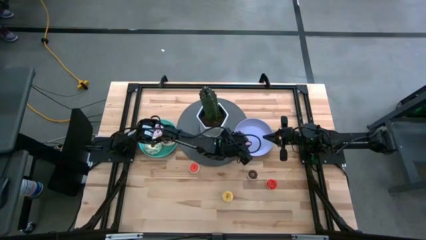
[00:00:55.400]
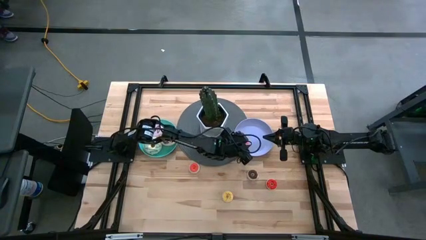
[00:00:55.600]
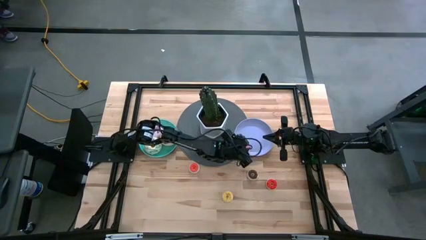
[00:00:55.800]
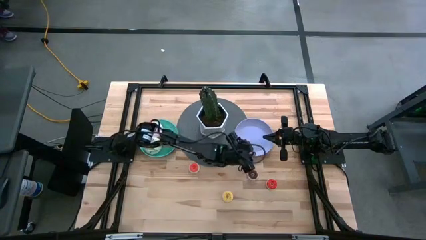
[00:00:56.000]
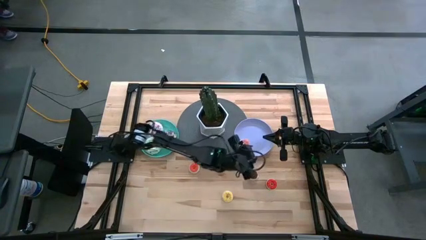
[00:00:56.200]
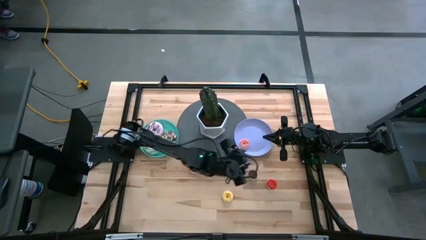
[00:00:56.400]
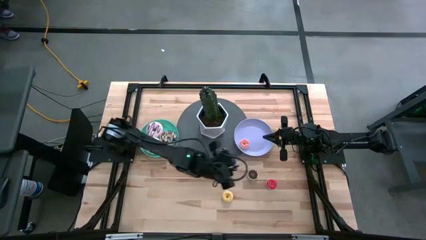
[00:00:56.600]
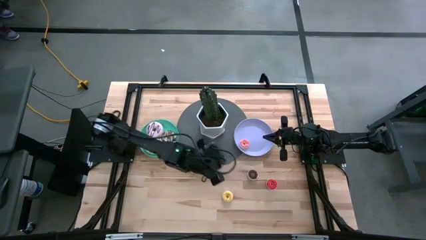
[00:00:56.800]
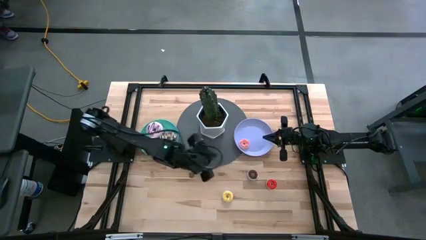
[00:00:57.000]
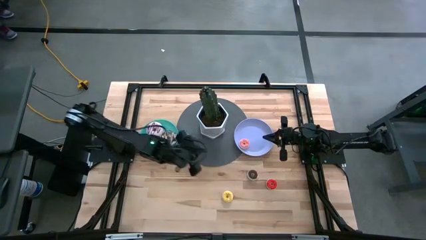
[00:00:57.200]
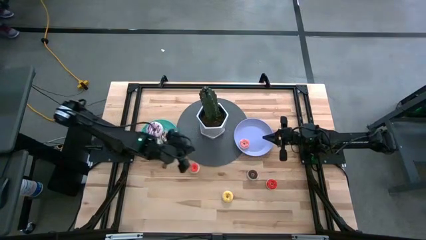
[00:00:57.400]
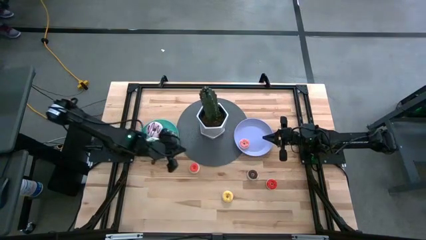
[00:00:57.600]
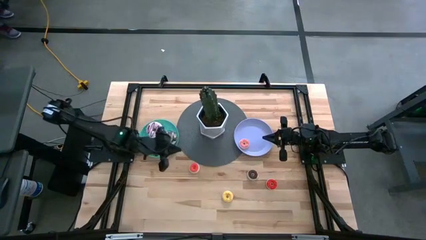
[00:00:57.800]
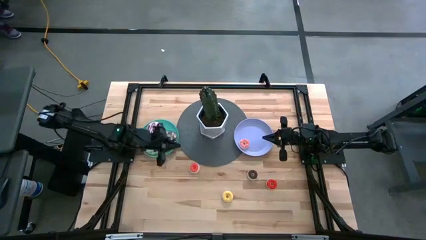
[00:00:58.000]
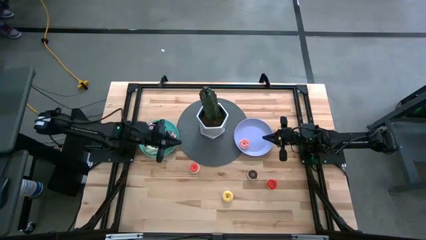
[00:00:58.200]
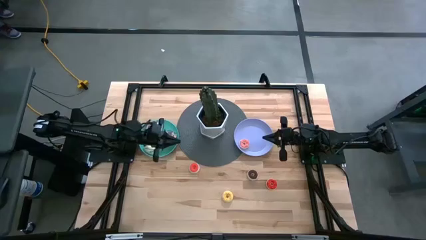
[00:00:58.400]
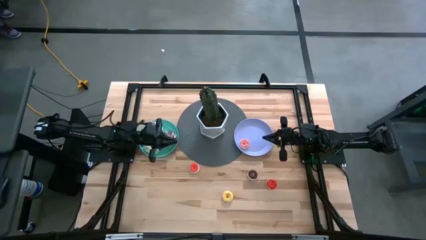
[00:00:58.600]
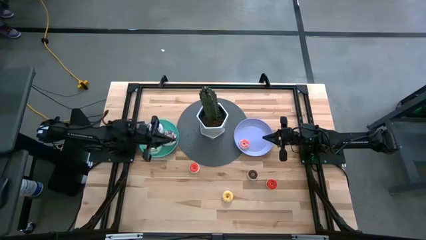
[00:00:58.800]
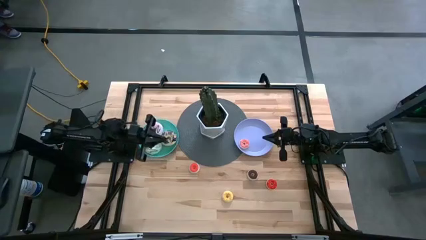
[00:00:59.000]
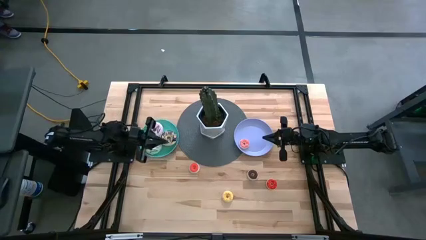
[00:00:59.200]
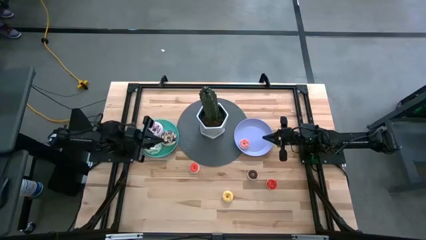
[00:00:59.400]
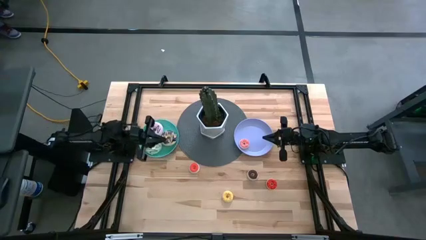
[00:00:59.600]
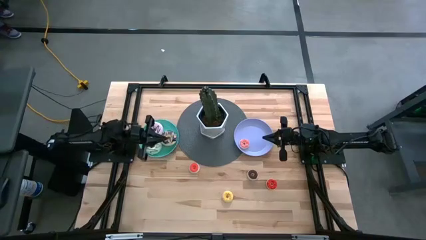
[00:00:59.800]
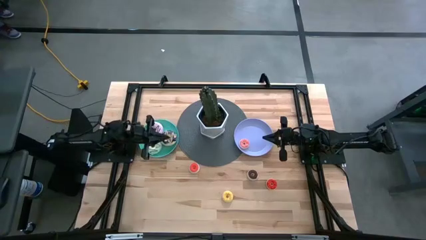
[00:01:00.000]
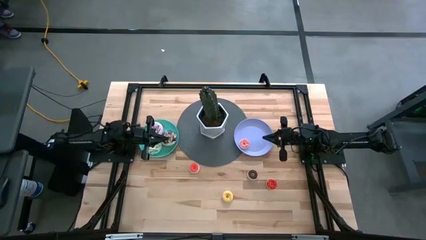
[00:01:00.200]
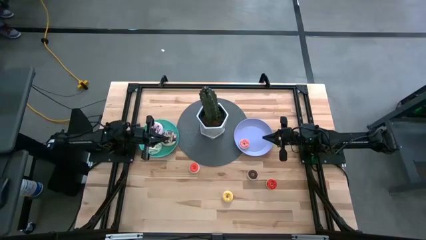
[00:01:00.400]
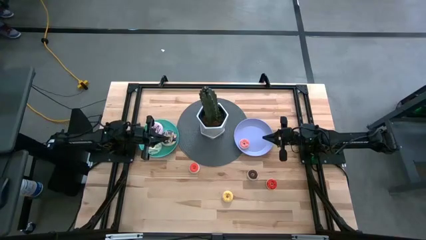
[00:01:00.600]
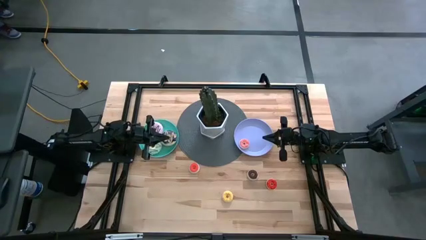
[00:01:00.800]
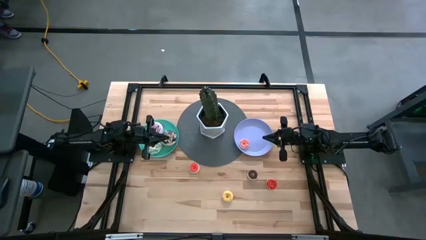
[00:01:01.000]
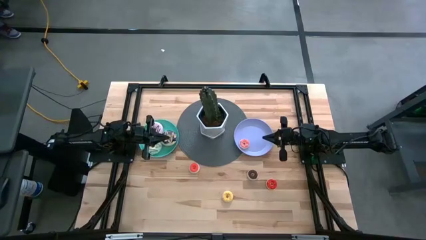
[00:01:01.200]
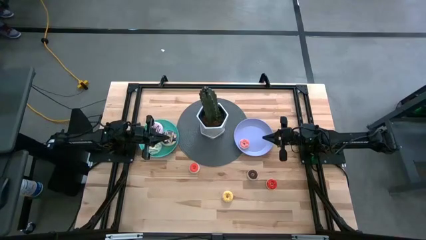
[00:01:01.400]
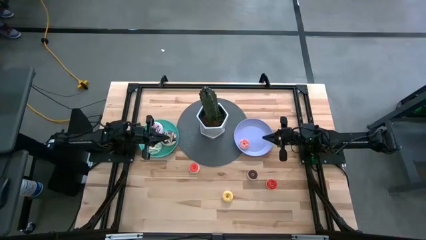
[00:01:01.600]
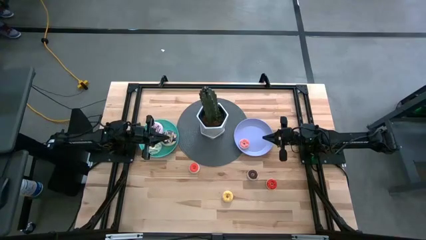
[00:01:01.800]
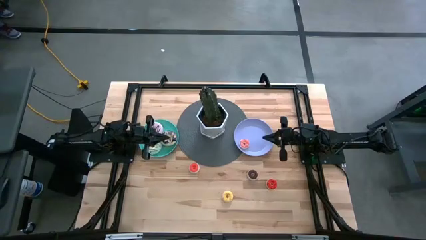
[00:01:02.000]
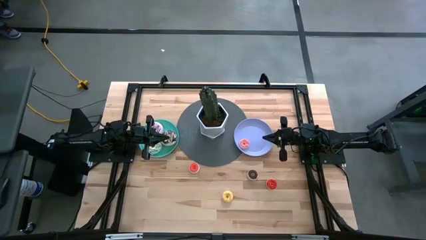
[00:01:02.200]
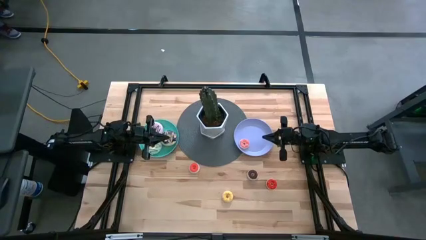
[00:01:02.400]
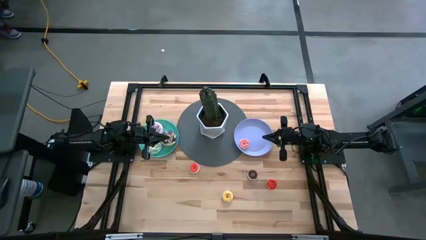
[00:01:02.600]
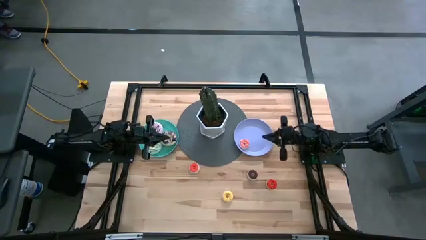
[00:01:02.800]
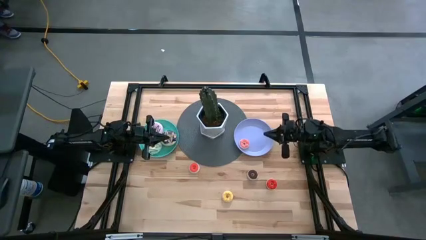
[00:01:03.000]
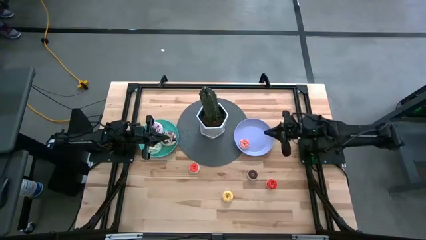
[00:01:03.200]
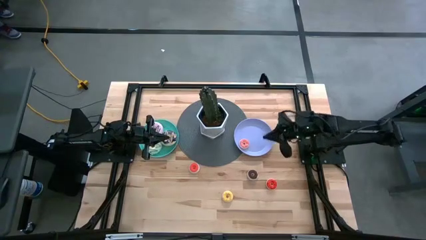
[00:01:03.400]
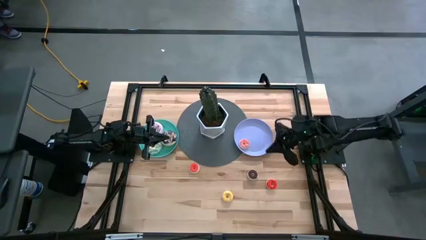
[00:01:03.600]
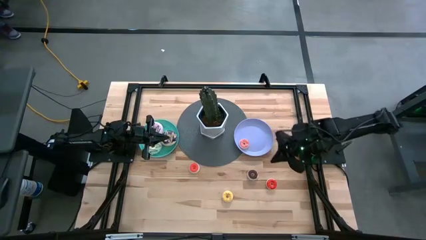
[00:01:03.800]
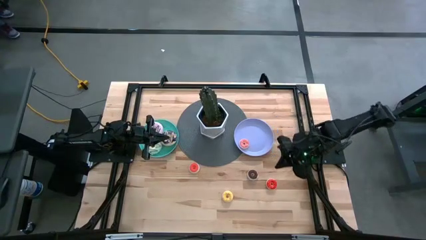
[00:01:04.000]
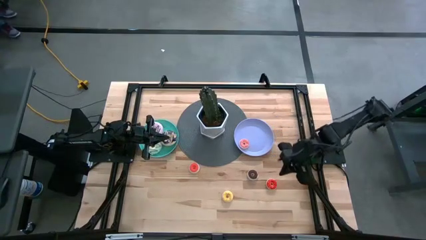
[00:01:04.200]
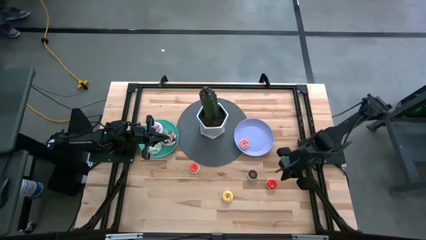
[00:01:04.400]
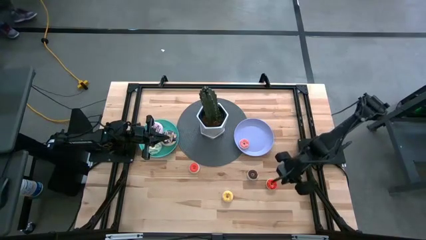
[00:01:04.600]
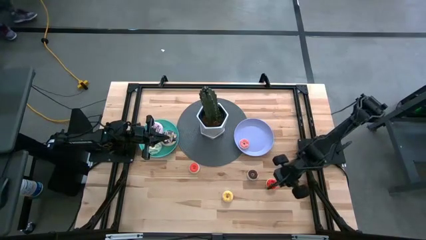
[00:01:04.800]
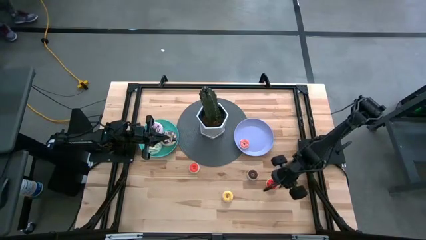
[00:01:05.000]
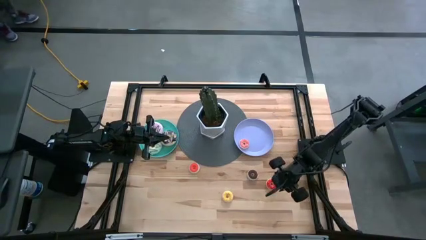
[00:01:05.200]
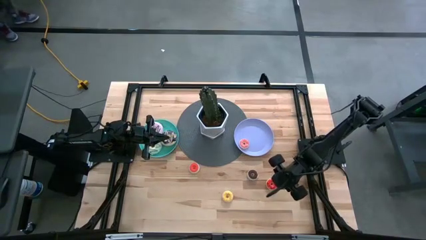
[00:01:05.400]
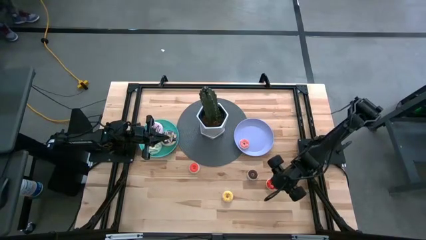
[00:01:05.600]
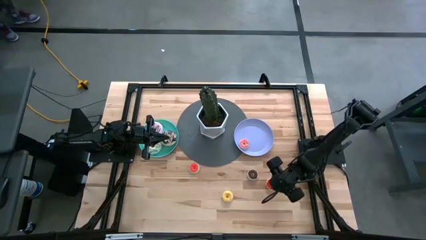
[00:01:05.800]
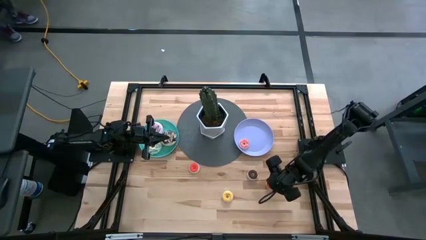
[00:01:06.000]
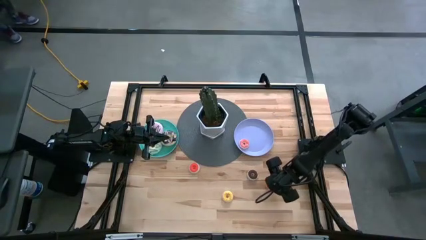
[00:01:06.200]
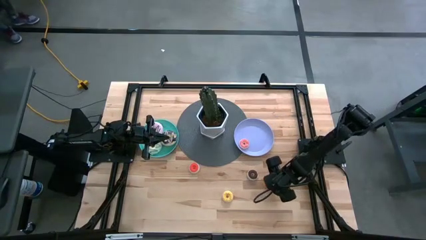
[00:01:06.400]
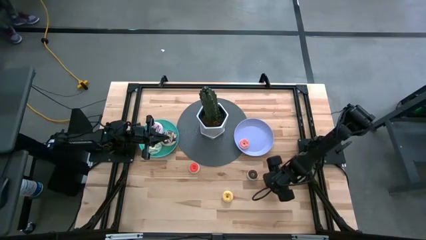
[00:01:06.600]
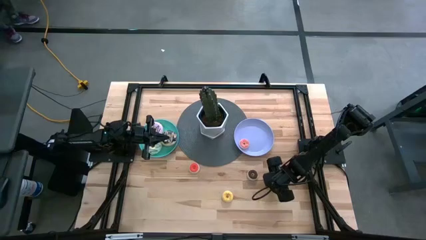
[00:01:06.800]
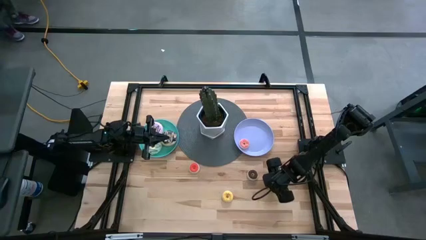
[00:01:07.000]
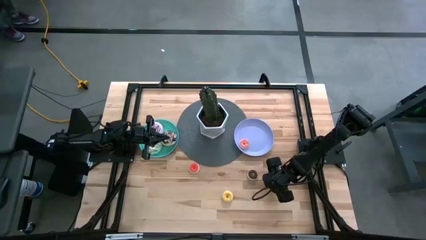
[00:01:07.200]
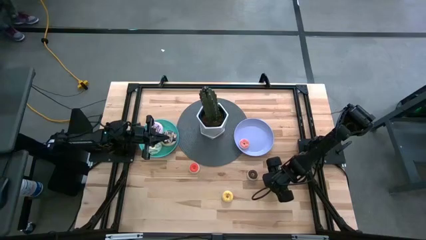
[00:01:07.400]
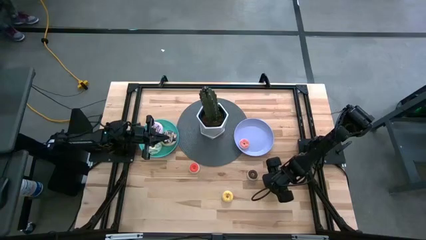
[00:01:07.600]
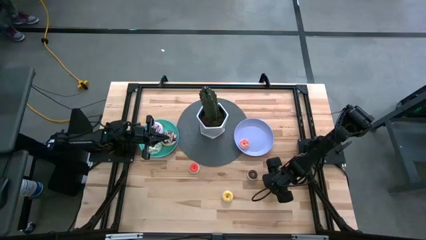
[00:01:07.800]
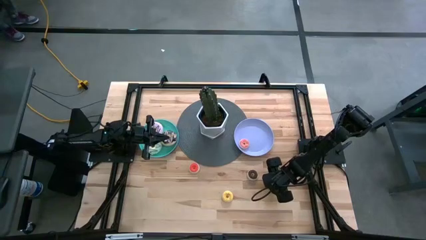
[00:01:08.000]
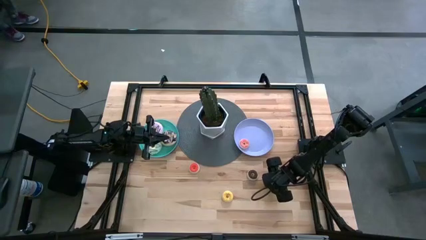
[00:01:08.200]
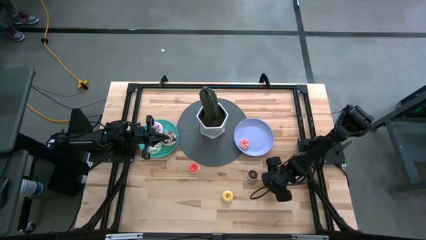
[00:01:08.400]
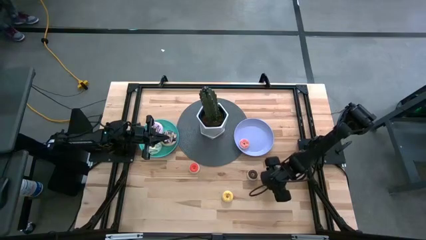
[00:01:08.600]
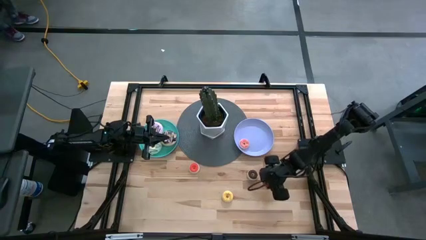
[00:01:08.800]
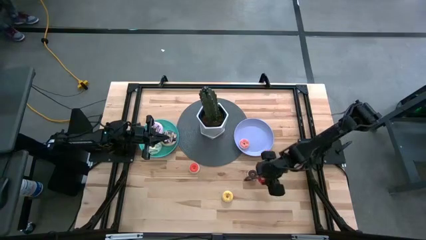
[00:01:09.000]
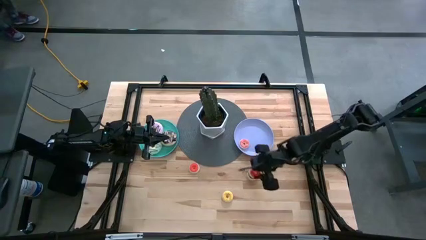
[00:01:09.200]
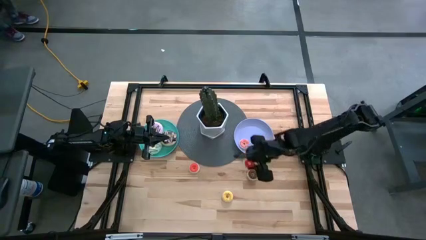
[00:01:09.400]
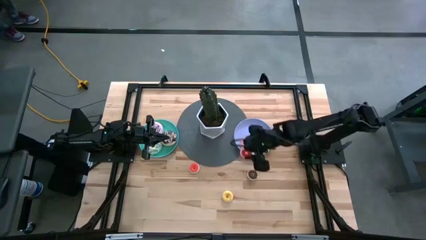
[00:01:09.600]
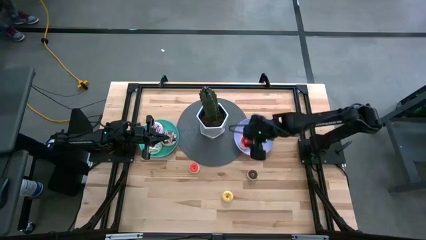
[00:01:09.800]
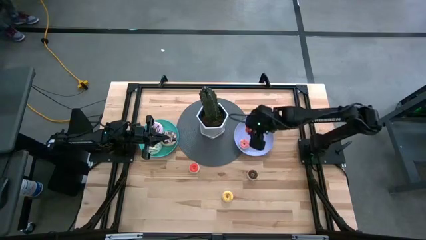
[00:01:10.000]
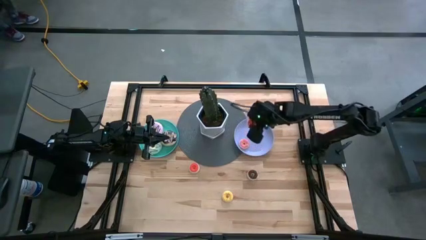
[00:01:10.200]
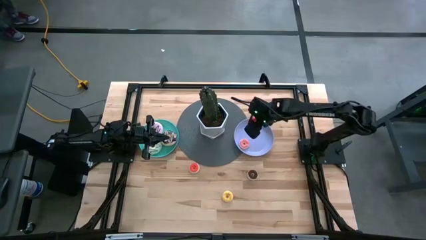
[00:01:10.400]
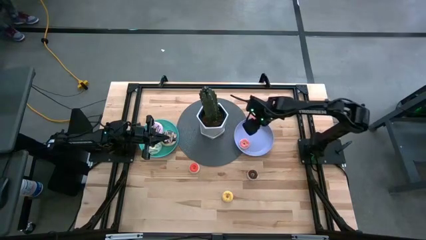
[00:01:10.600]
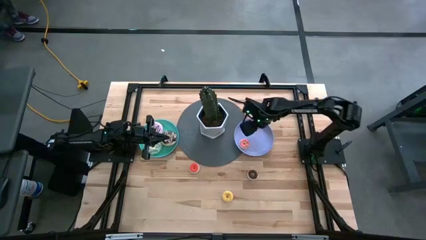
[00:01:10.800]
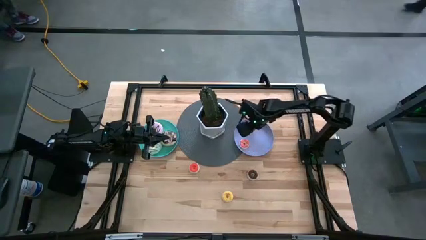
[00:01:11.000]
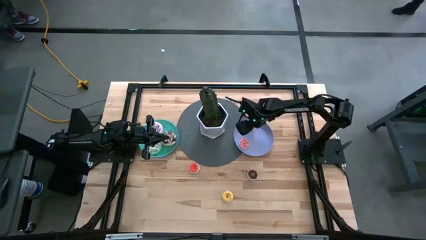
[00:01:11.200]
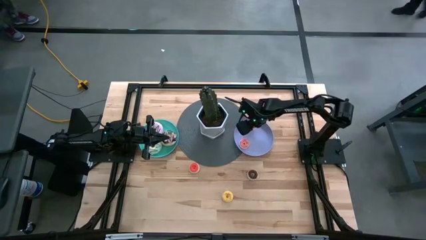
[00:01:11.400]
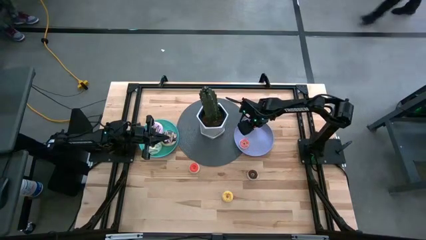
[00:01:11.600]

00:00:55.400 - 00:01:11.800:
Task: Pick & Place donuts
Put the small red donut on the purple plate
